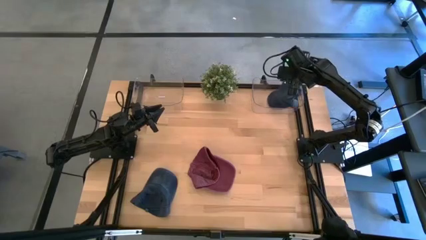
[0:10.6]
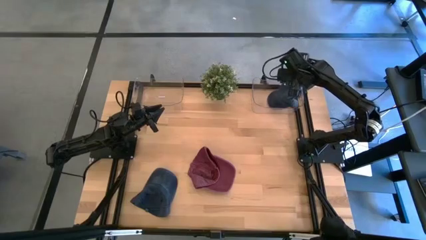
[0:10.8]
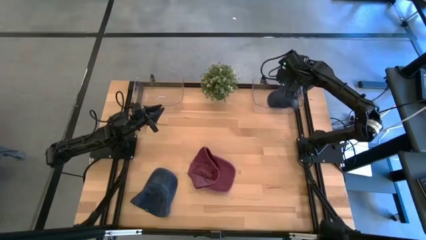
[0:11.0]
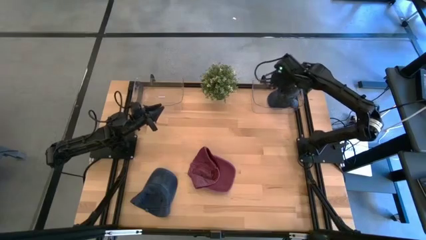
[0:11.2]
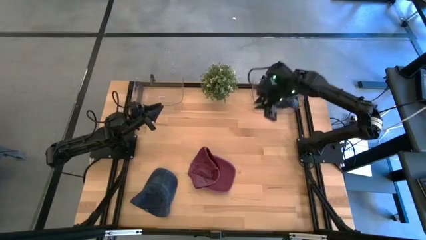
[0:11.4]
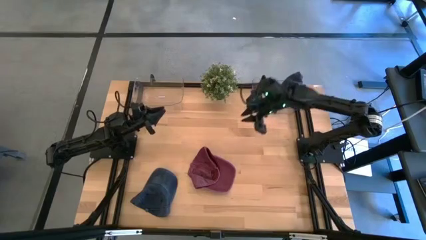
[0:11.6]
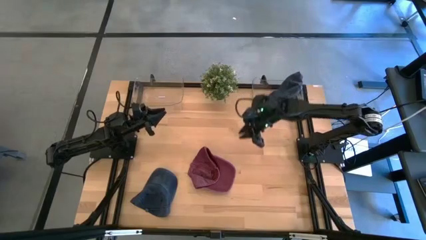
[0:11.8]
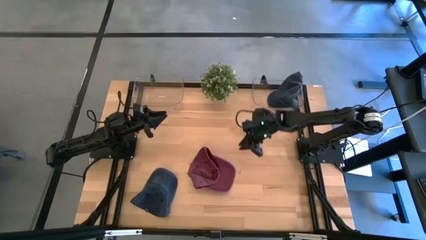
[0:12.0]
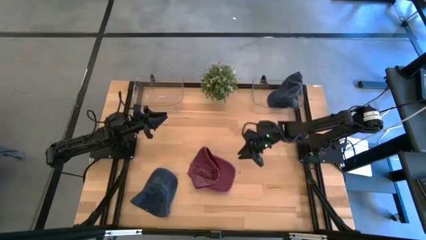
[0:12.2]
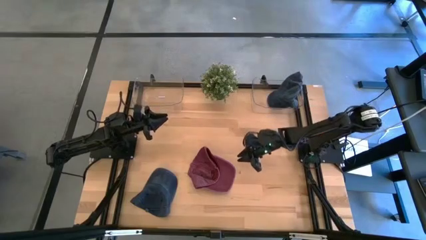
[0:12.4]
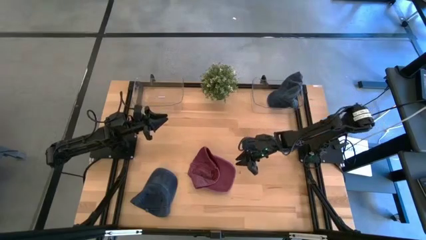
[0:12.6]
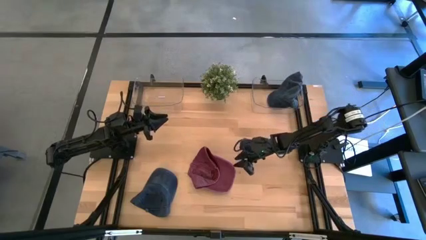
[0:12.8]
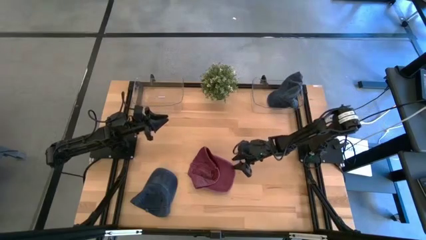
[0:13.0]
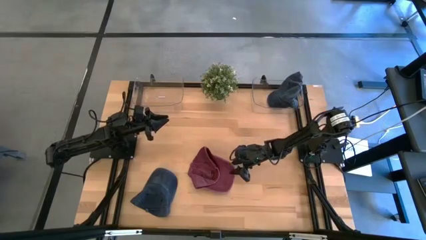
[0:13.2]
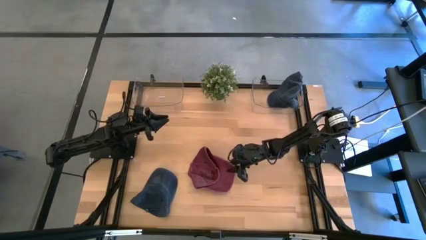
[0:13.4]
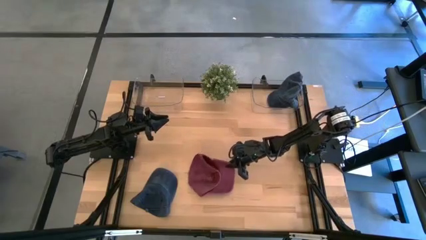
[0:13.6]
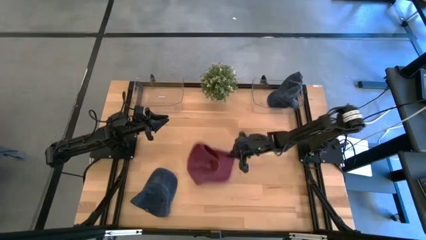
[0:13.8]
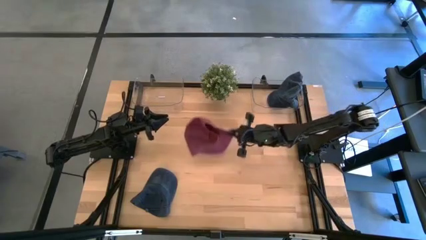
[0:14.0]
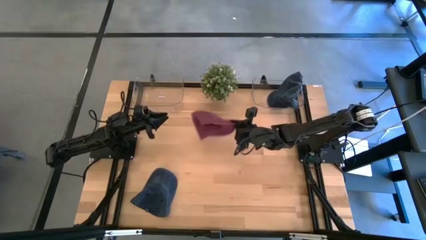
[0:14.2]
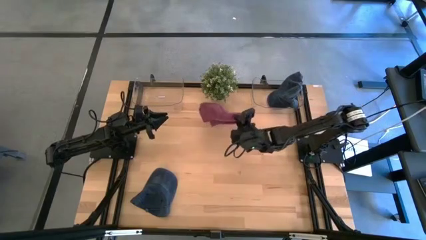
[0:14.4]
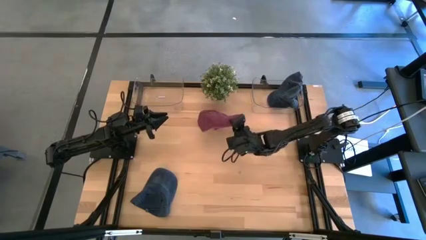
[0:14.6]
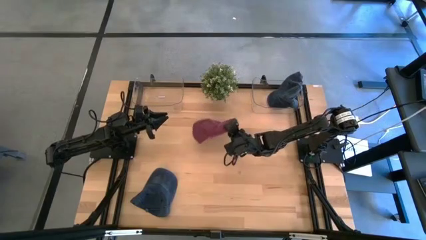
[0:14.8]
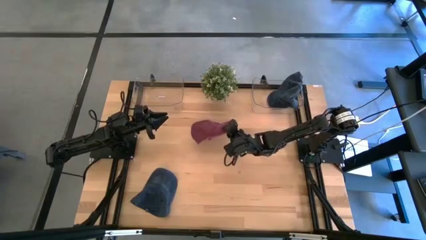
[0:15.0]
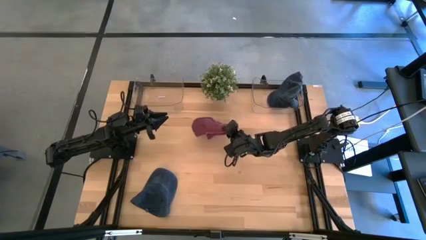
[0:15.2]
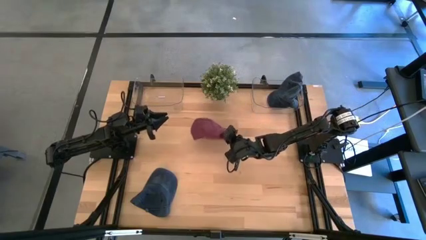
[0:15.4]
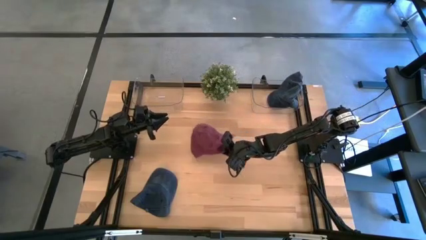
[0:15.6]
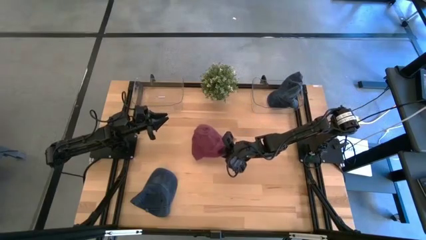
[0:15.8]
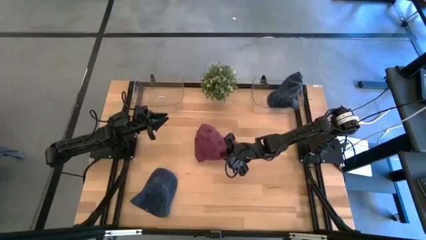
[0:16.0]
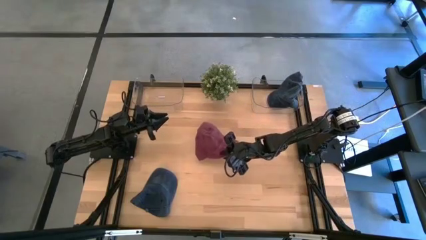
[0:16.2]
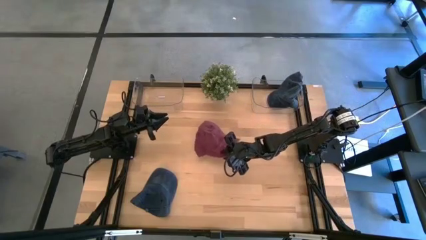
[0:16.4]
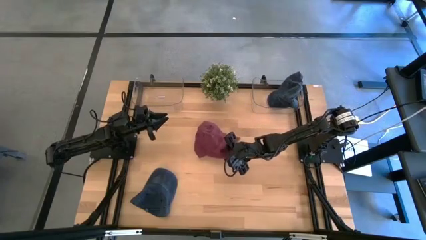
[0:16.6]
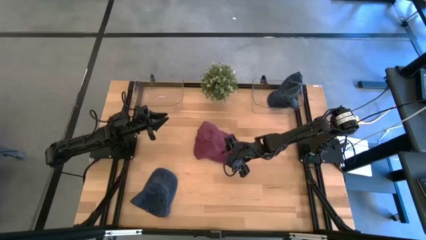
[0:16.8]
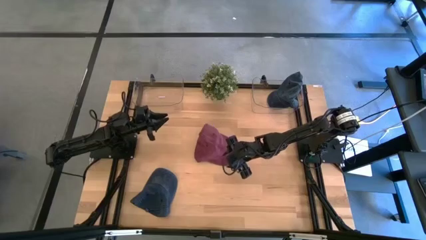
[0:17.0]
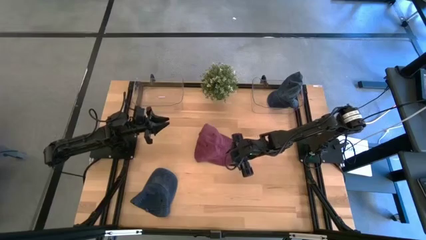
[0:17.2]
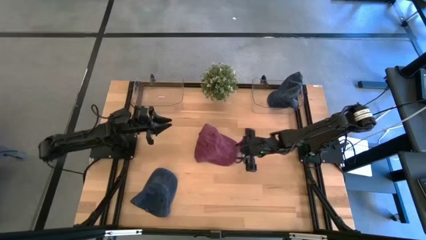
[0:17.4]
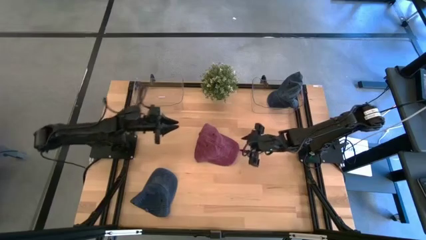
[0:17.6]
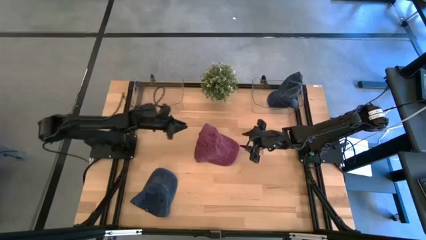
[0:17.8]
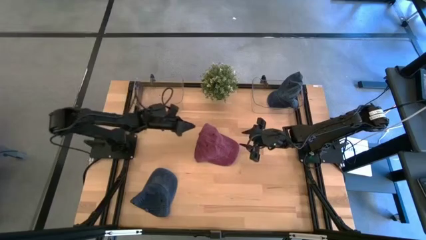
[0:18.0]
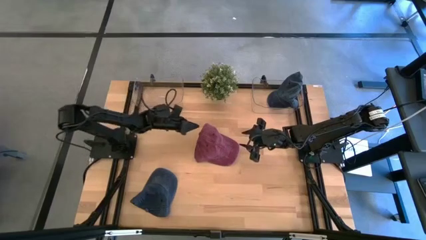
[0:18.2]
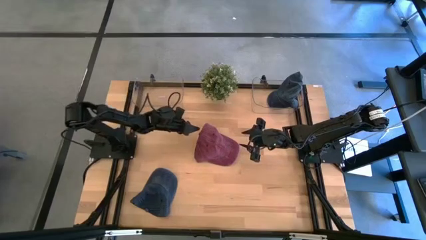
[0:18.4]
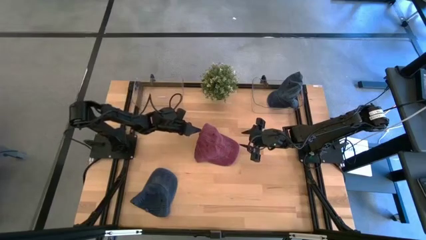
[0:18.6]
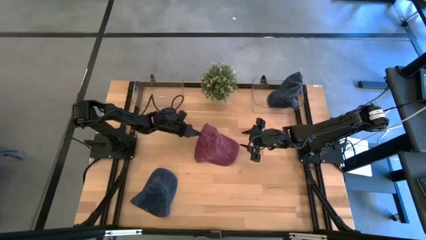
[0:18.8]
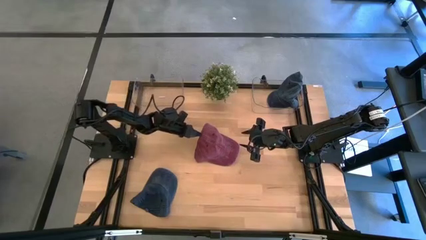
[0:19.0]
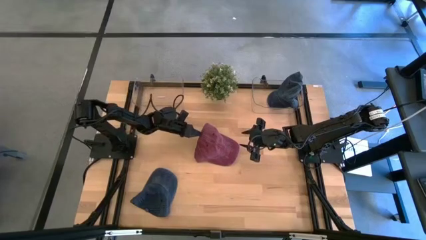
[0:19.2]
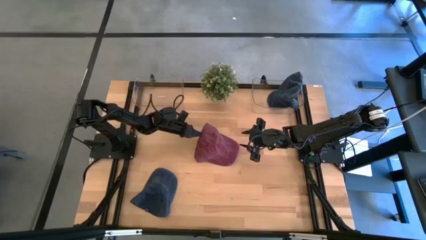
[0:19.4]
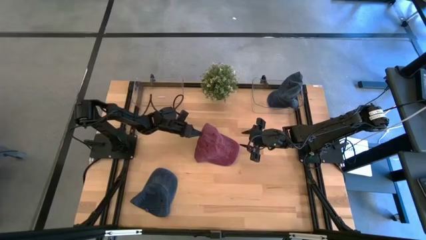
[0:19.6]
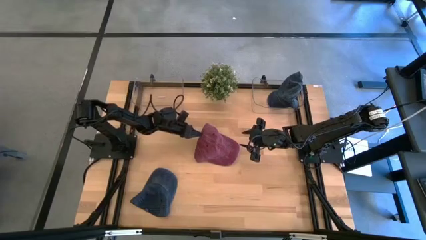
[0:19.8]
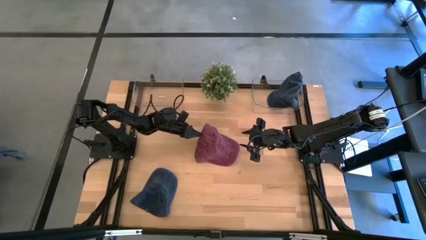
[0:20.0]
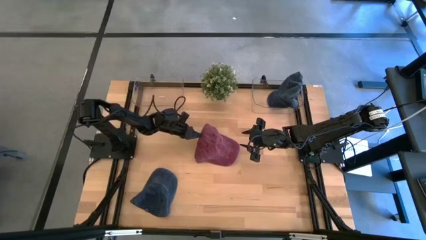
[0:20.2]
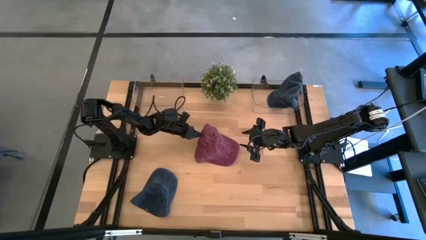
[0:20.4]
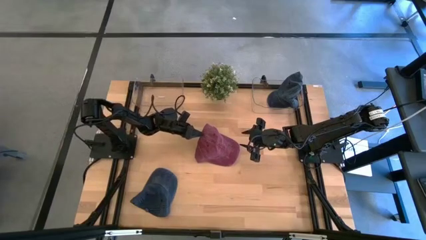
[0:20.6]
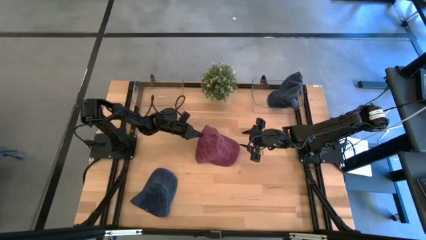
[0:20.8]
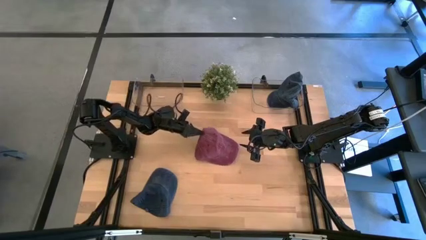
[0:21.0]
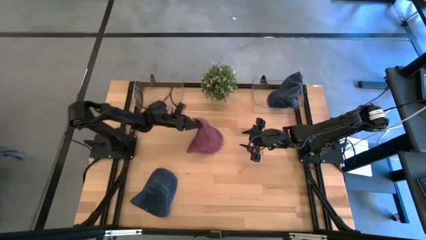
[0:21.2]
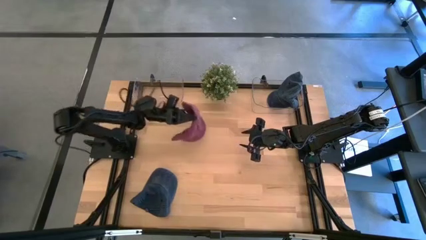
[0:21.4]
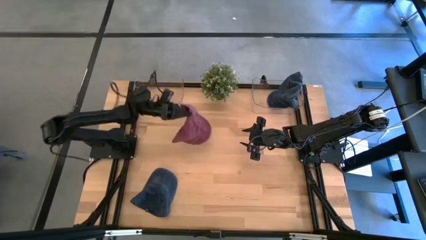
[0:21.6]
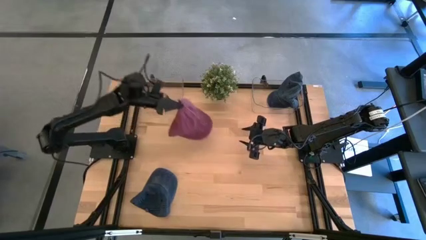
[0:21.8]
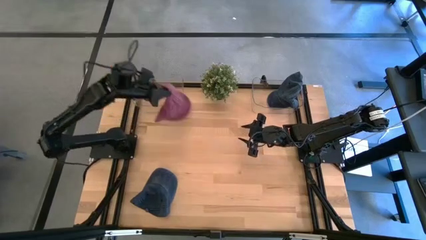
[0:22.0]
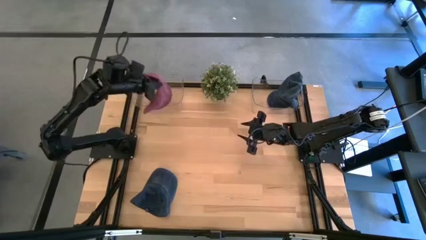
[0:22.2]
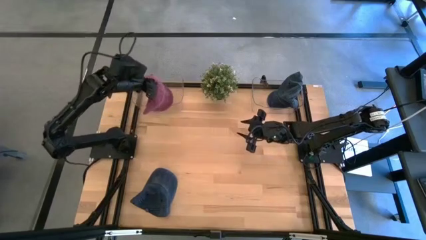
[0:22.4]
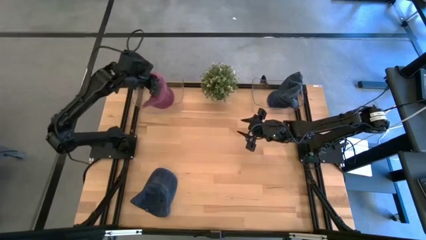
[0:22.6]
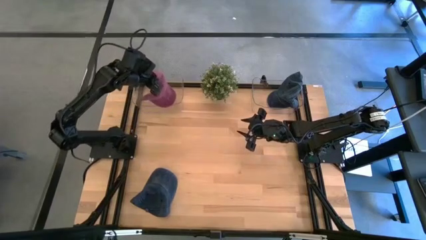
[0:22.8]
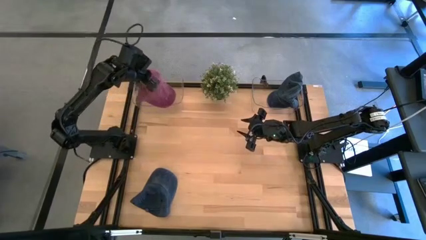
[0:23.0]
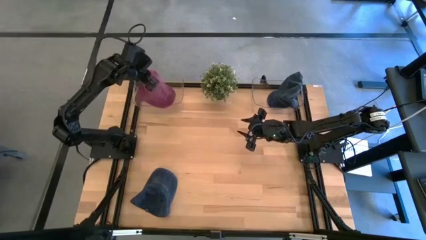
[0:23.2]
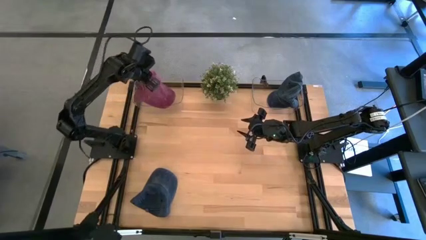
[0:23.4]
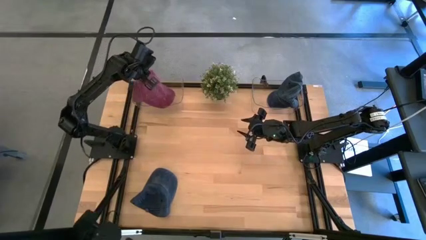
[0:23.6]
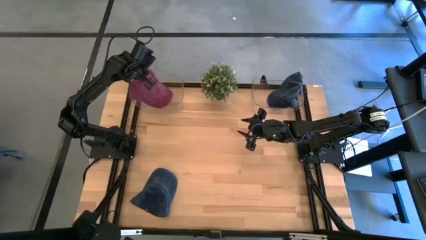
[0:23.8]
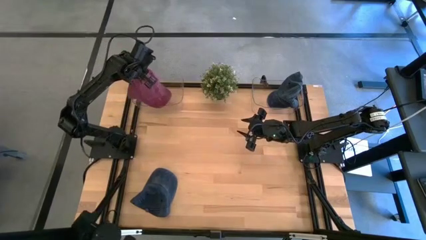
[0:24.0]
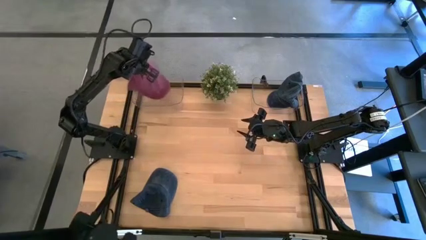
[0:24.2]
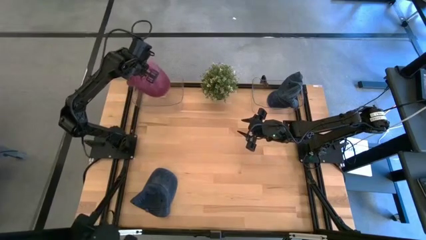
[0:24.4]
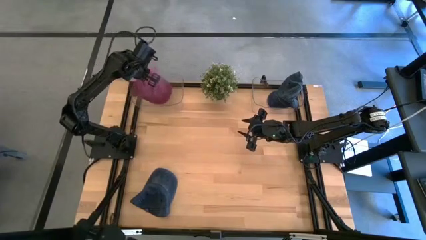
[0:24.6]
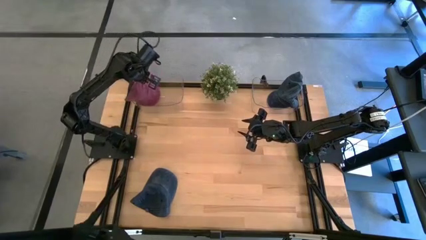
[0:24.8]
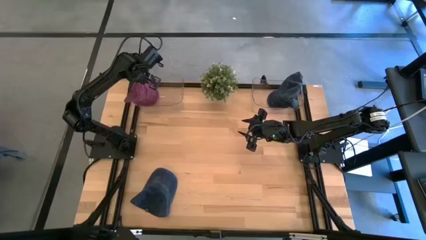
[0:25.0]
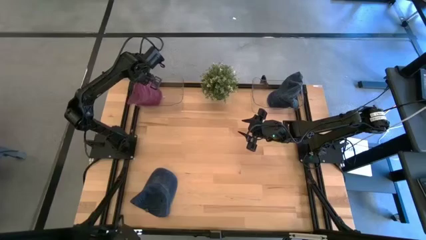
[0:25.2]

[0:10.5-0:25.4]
Task: Pick & Place hat
Put the red cap into the left transparent bin

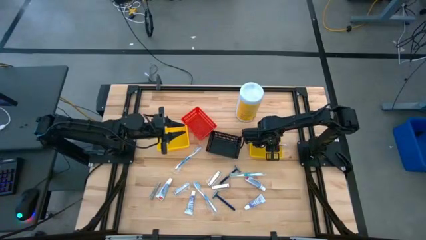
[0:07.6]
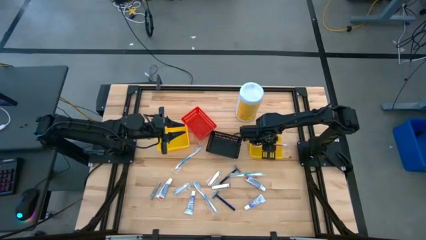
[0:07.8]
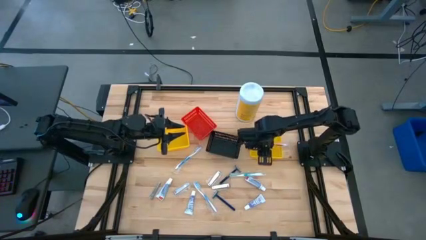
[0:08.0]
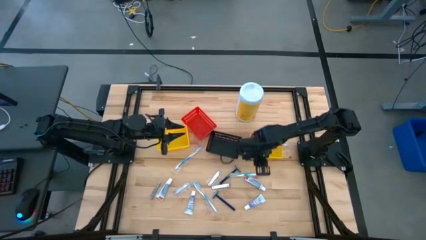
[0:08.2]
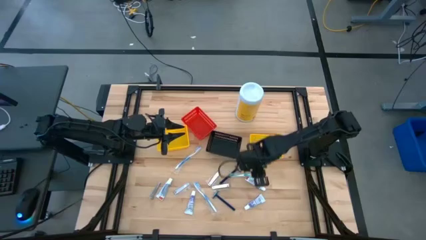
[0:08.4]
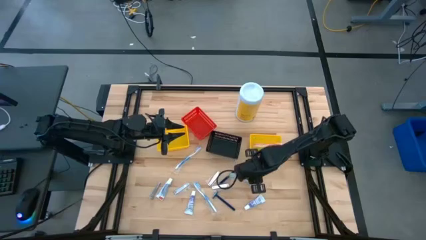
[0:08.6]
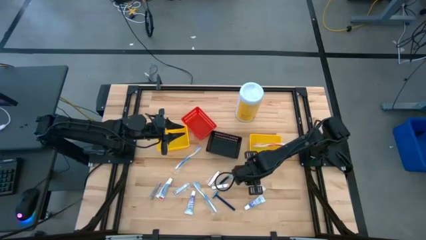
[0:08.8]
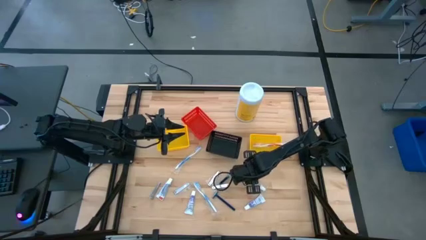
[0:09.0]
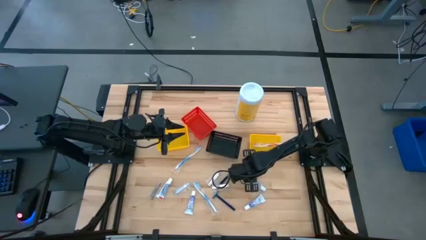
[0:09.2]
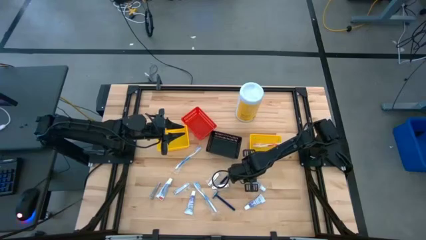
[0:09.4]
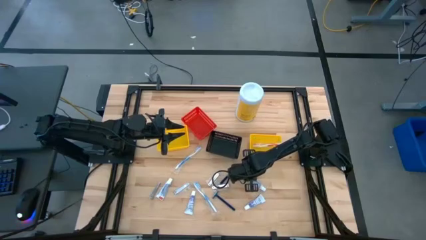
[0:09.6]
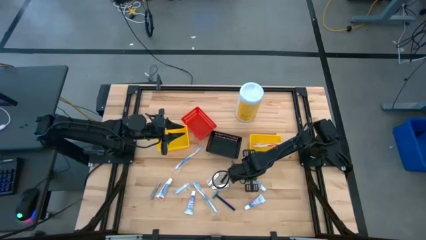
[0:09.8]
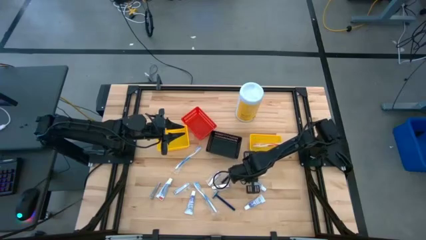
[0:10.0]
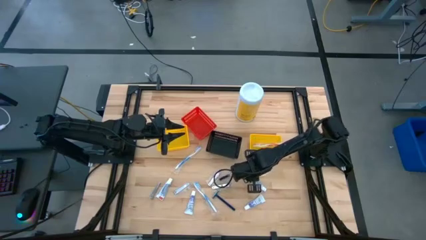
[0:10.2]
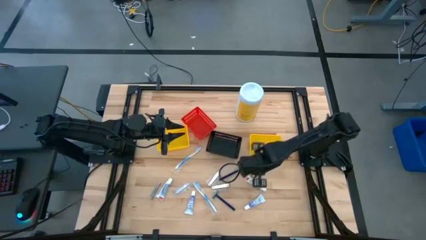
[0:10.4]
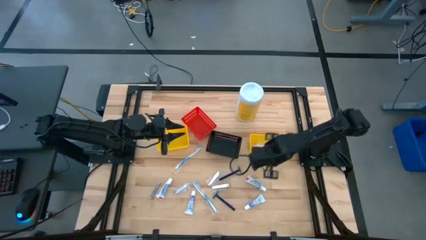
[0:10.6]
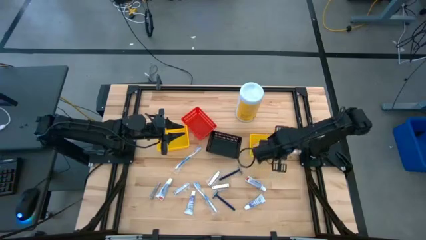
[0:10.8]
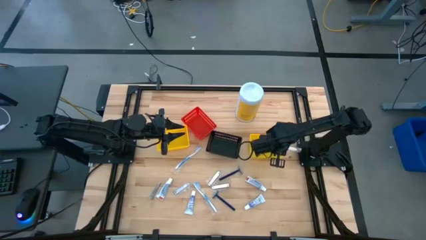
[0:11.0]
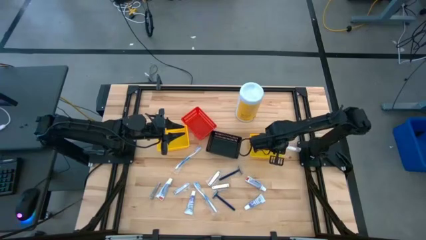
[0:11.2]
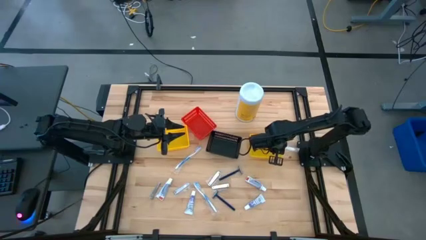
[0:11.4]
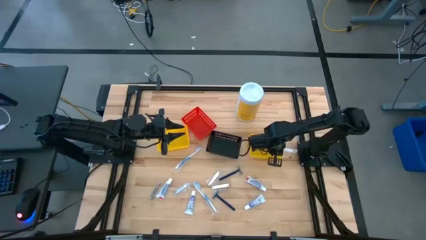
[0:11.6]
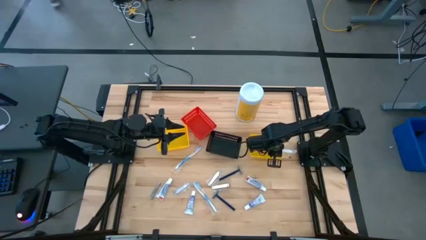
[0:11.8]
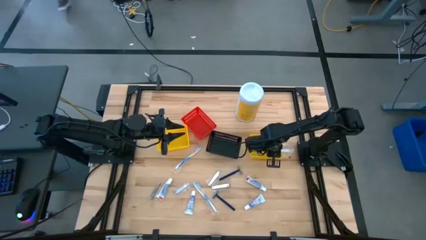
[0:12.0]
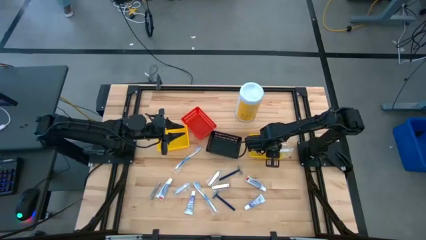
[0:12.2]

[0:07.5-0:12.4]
Task: Pick & Place Travel size toiletries
Put the toothbrush into the right yellow bin
